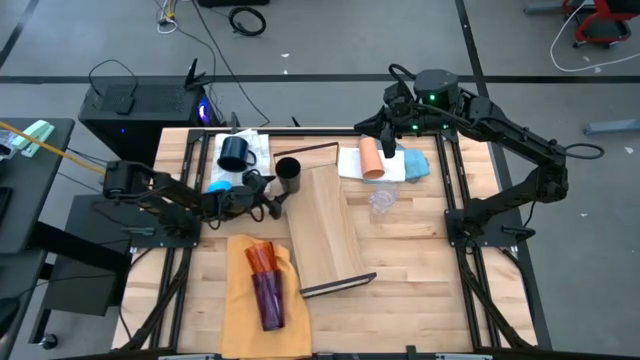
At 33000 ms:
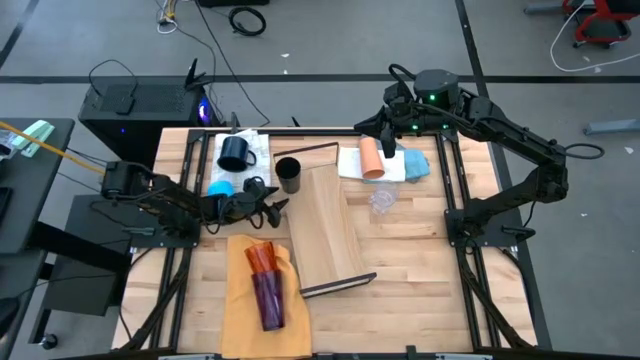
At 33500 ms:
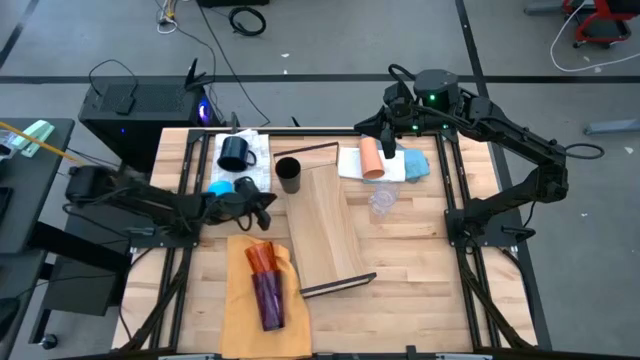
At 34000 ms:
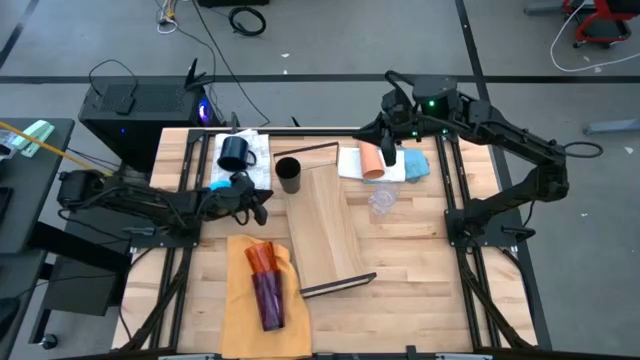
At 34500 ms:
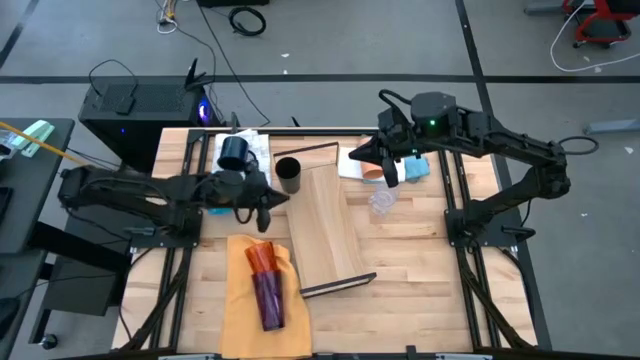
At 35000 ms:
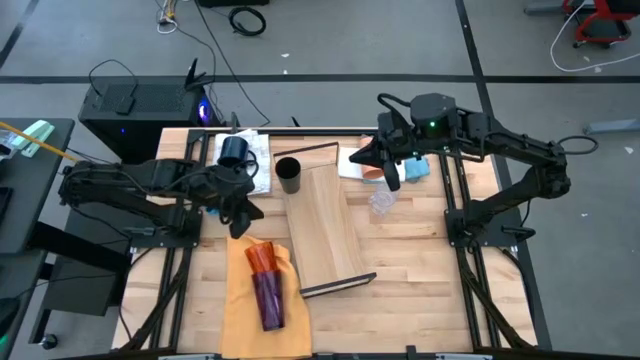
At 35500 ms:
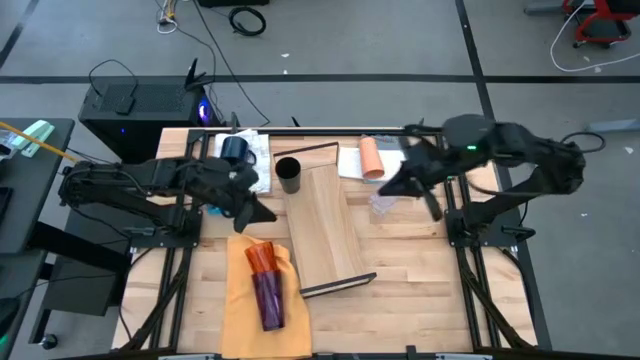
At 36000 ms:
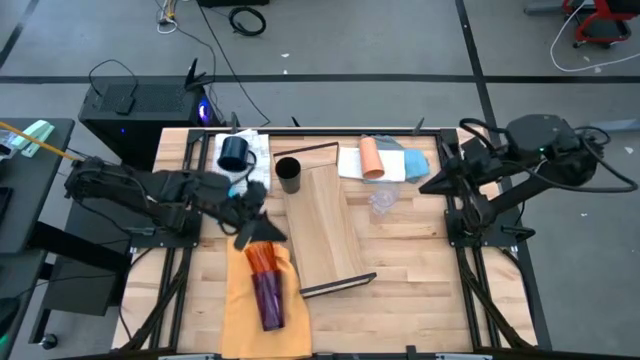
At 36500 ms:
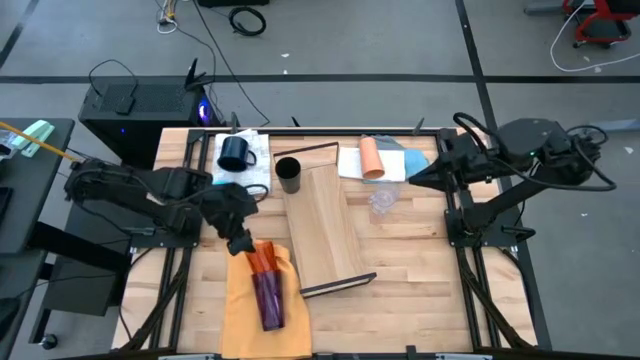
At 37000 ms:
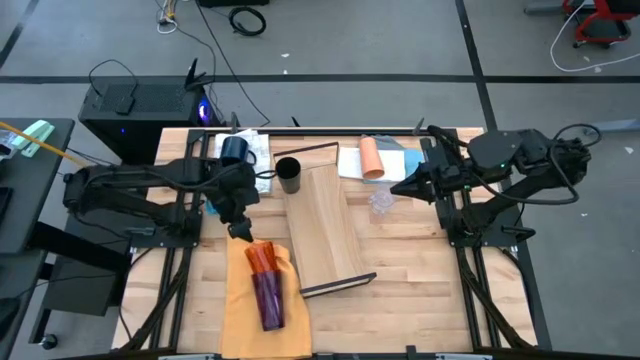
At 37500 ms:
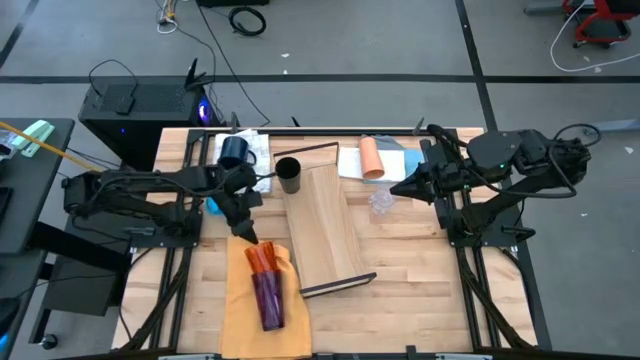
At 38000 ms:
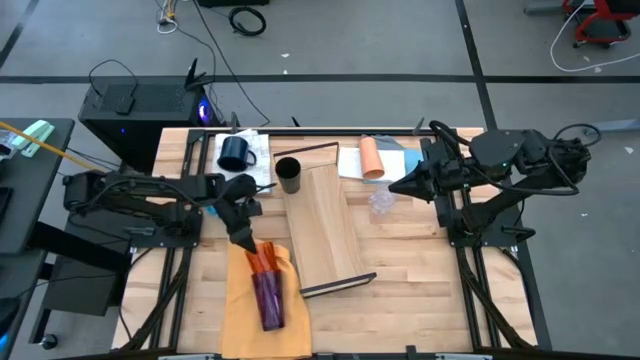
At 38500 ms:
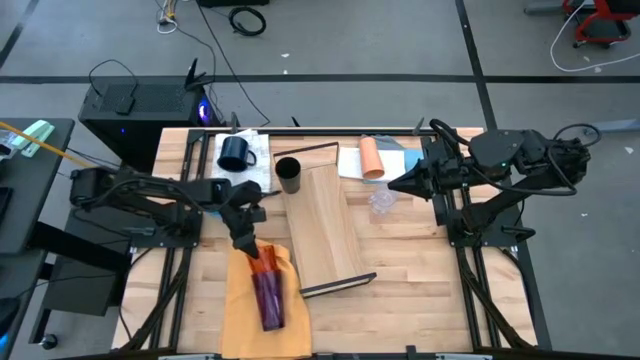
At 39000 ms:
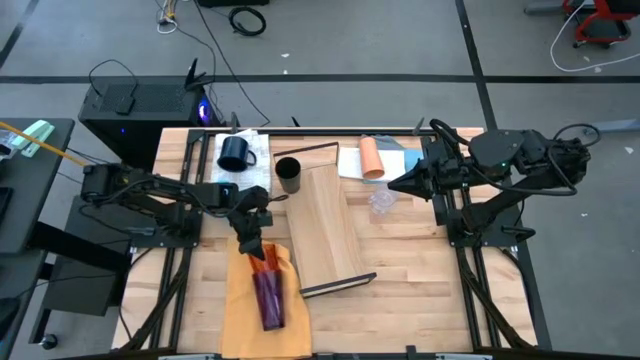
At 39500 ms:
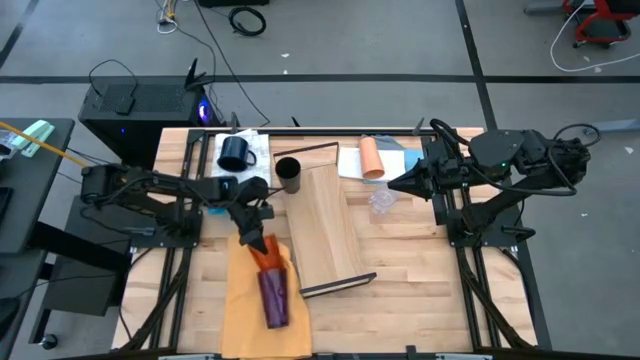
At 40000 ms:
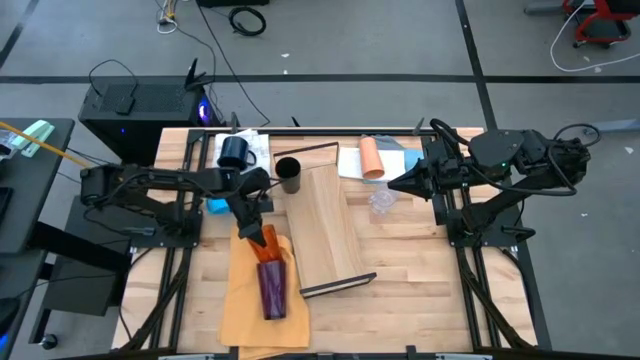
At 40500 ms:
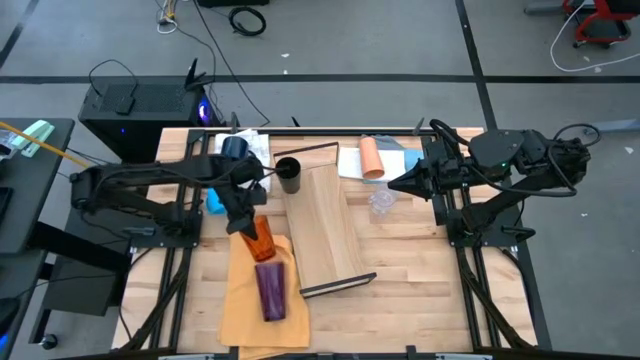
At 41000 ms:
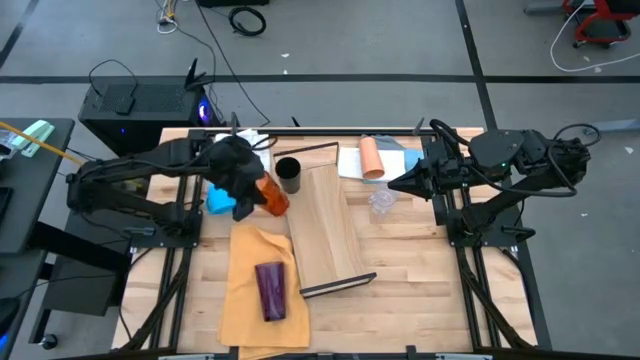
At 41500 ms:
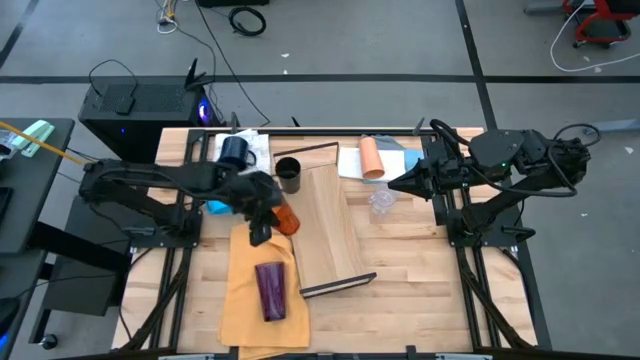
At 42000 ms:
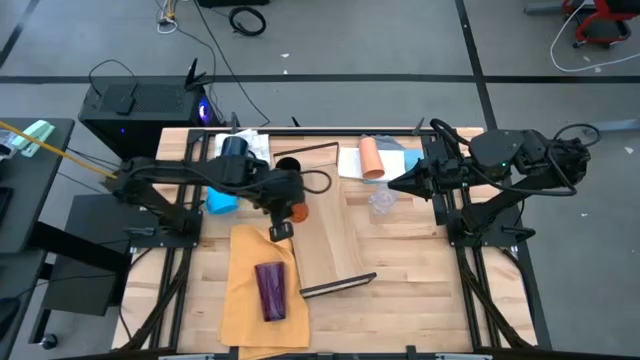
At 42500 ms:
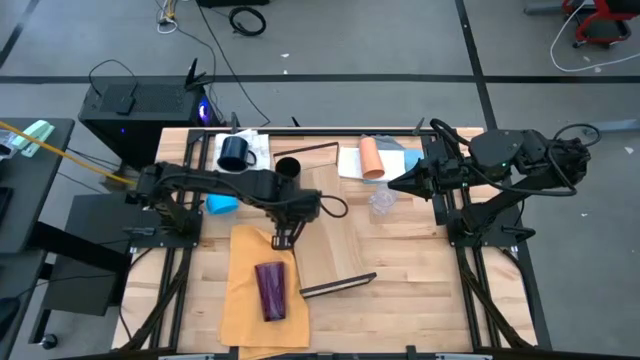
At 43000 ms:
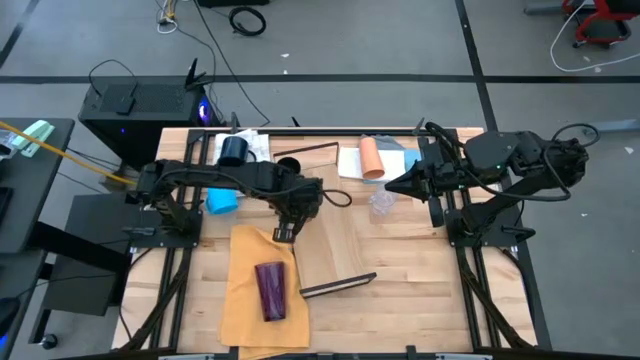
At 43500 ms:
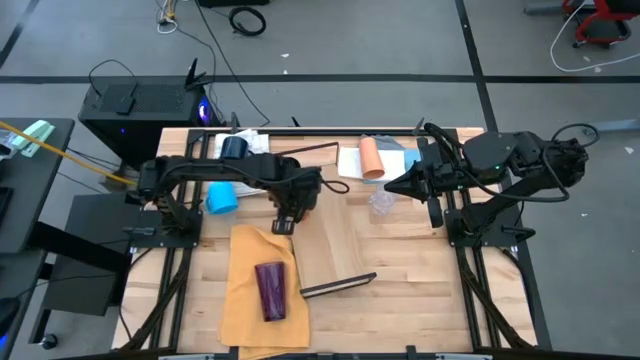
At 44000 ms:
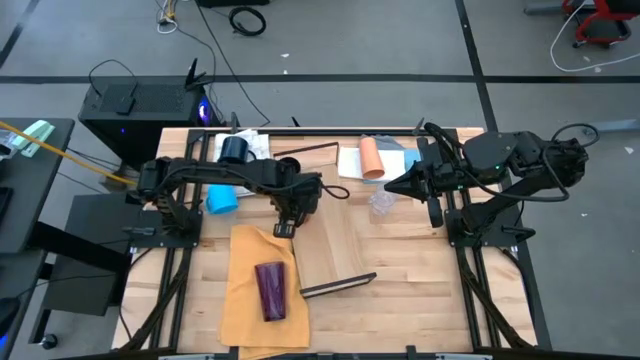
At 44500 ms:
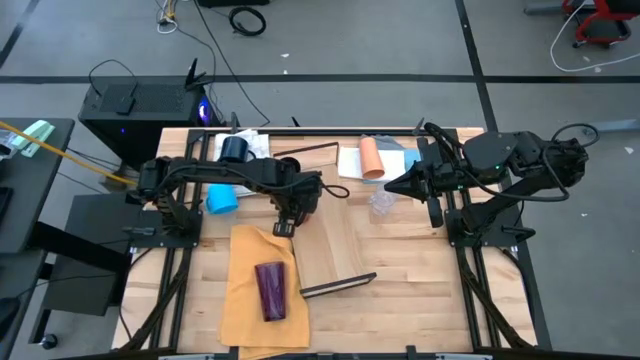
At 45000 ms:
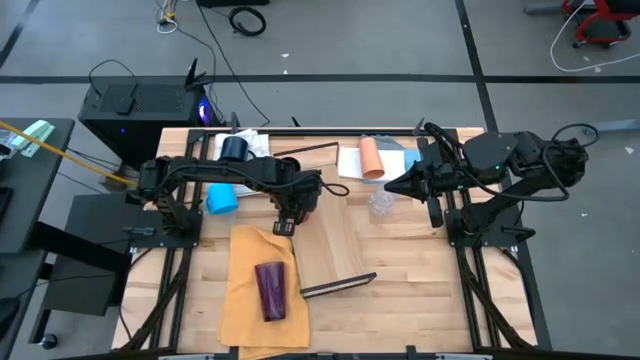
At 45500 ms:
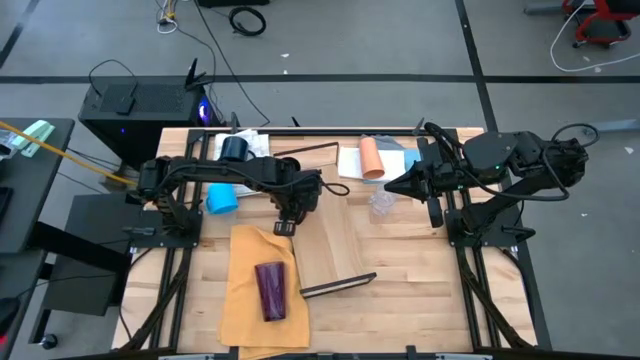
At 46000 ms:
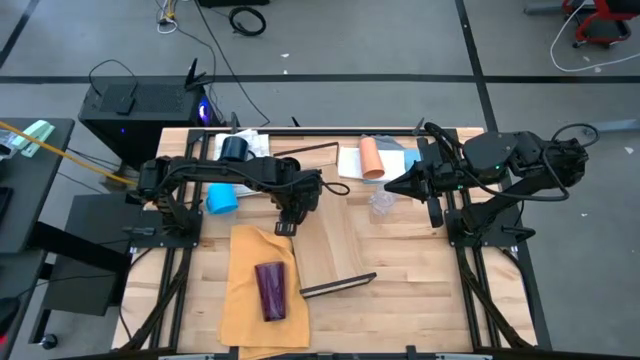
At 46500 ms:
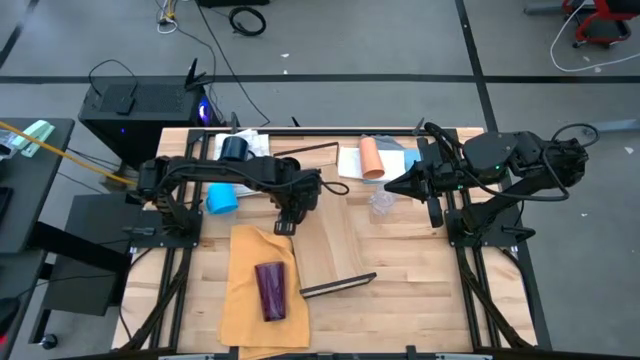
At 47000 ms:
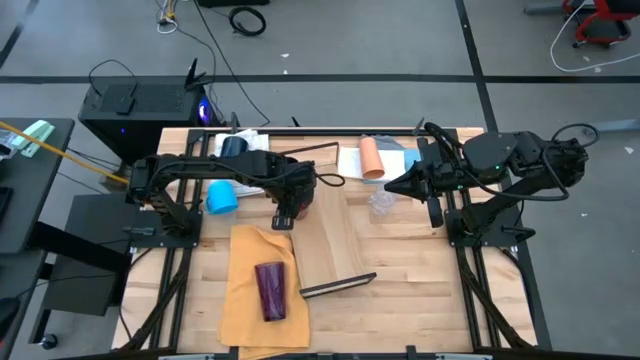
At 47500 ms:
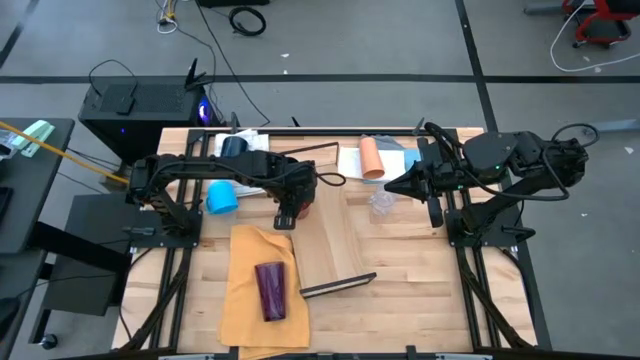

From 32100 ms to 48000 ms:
Task: Stack small to large cups/mugs on shelf
Put the brown cup on the shelf

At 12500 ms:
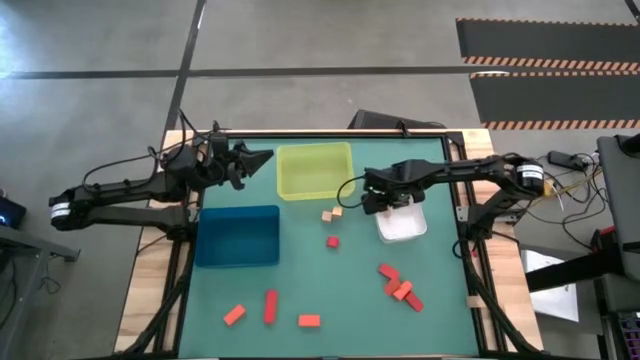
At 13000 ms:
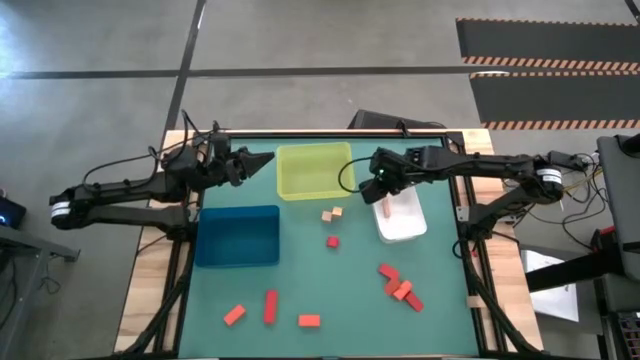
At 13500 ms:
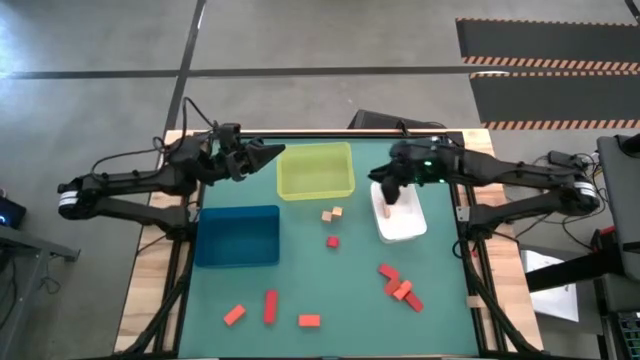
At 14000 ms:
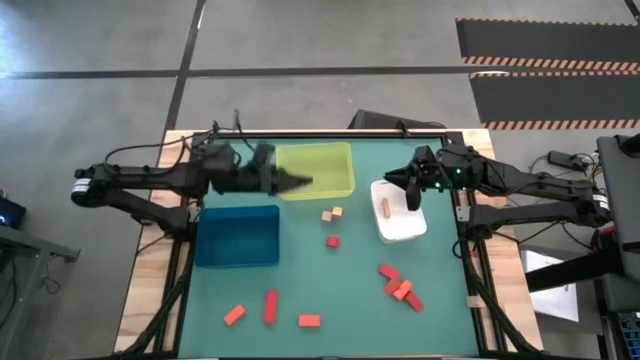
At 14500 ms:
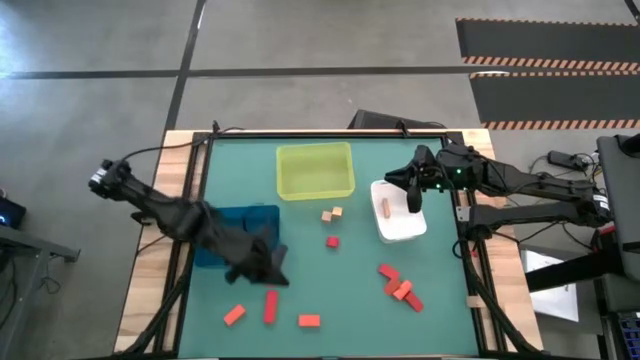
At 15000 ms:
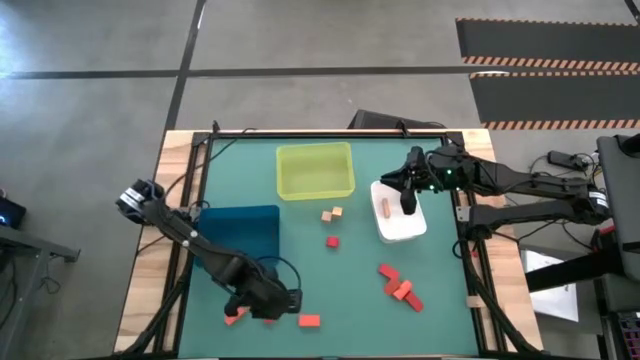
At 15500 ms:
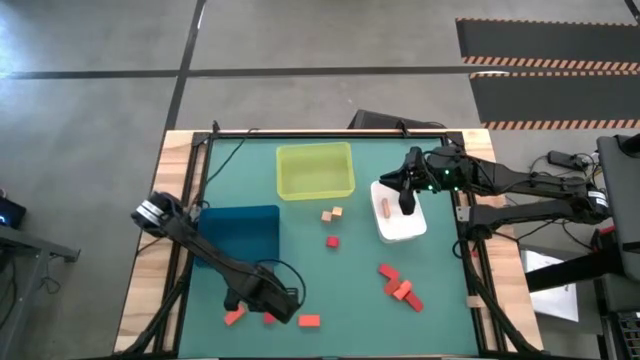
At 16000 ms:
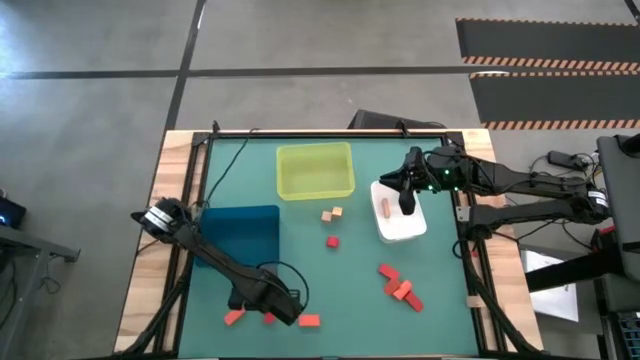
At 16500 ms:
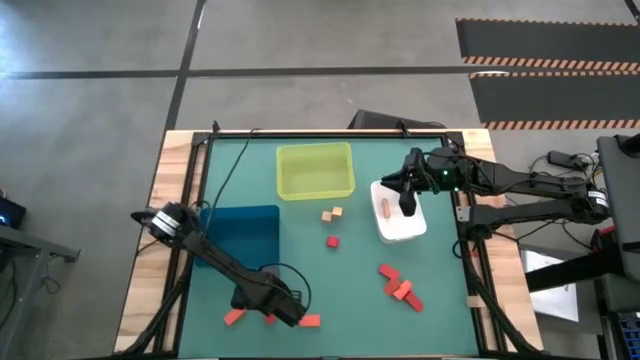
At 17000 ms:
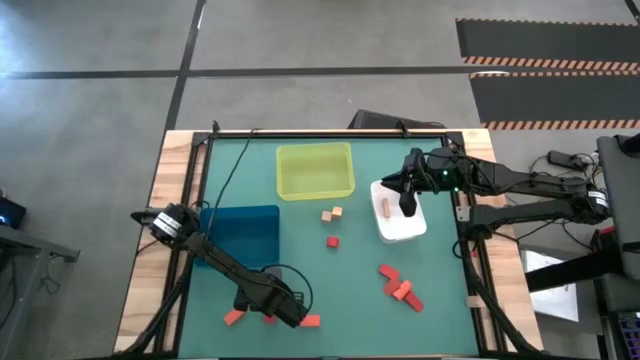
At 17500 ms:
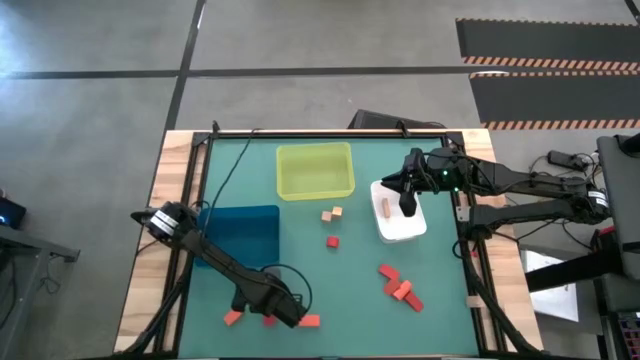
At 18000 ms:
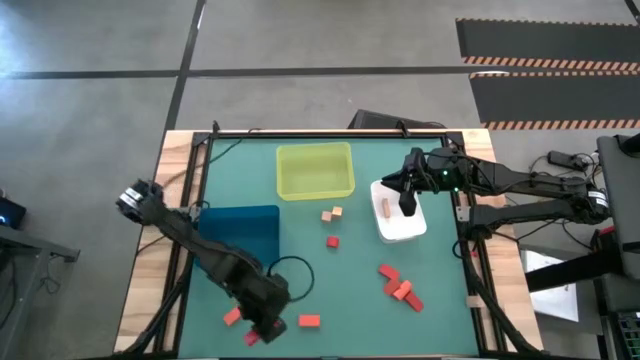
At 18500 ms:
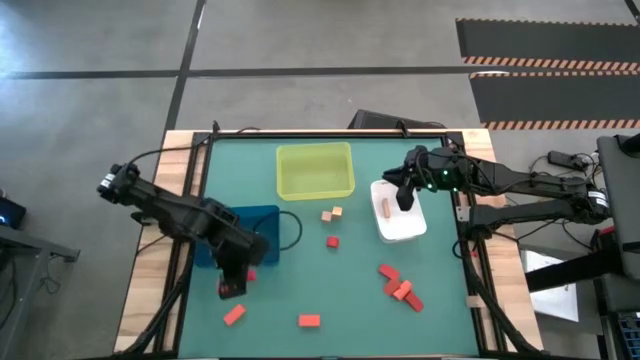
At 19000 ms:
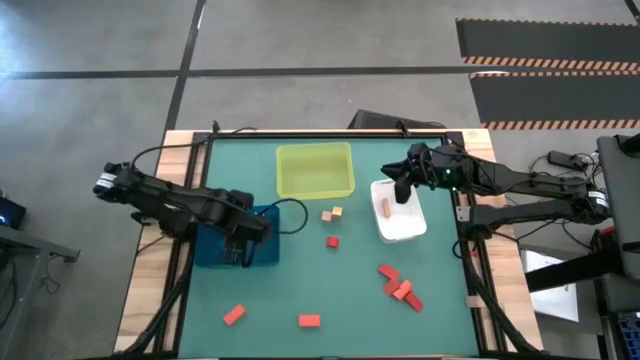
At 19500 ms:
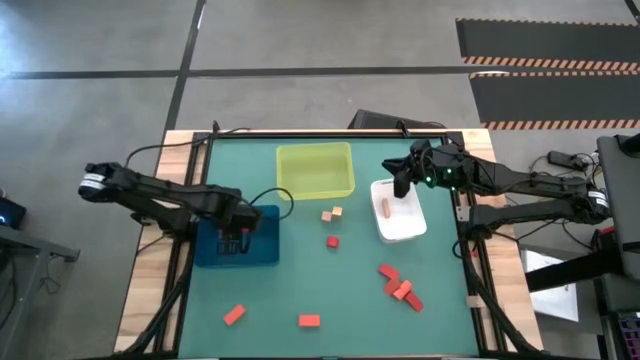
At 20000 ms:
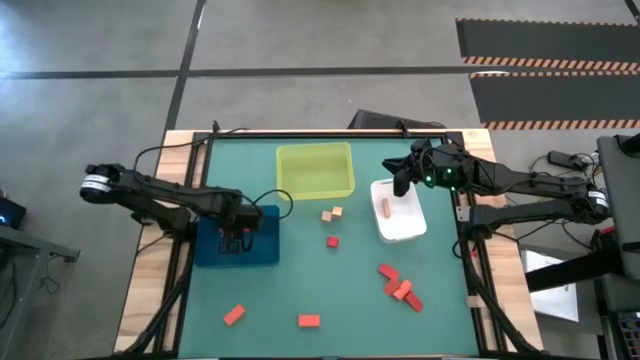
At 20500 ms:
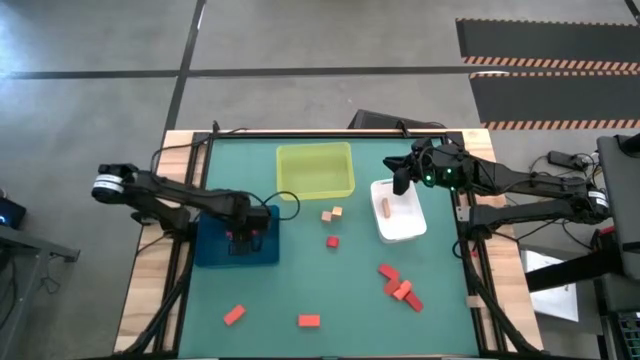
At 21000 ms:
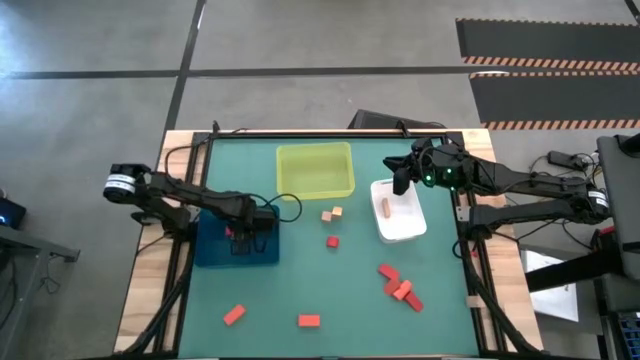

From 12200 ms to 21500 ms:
Task: Sort & place blocks by color
Put the red block into the dark blue bin
